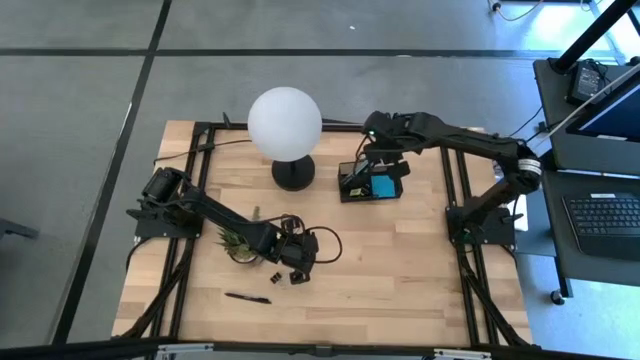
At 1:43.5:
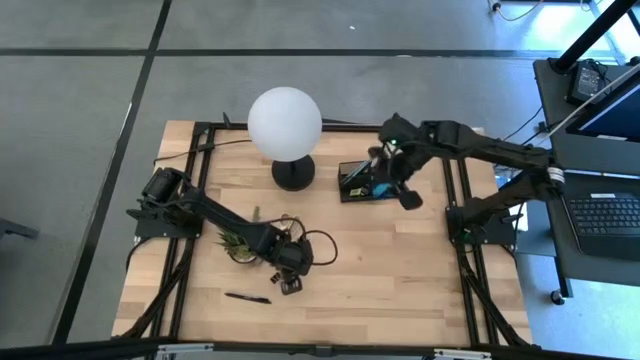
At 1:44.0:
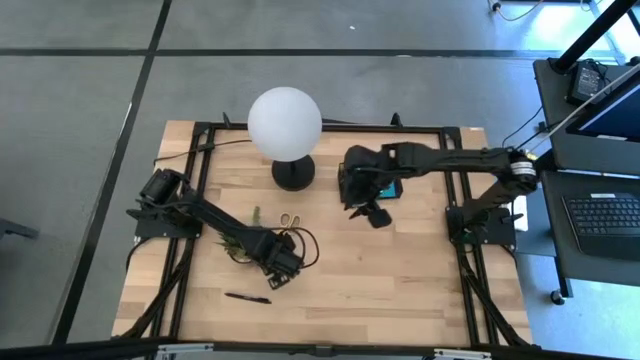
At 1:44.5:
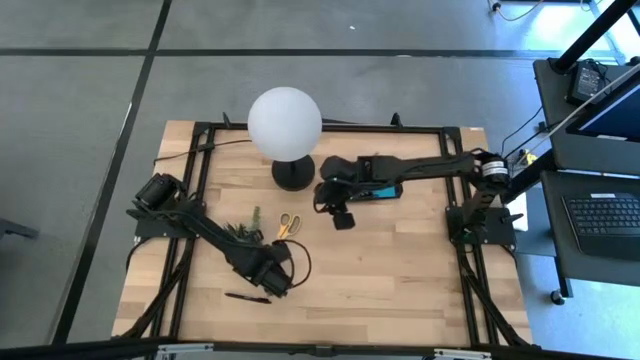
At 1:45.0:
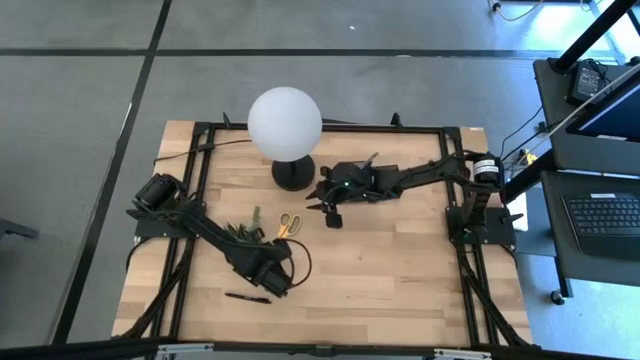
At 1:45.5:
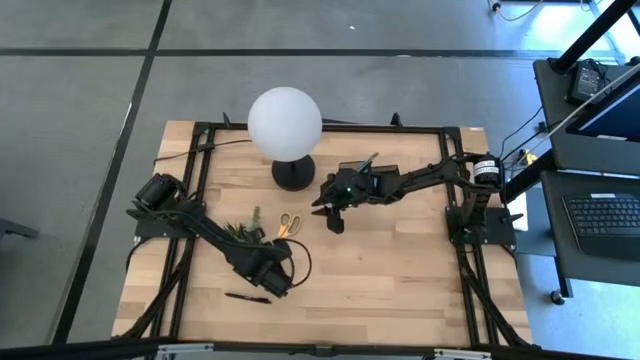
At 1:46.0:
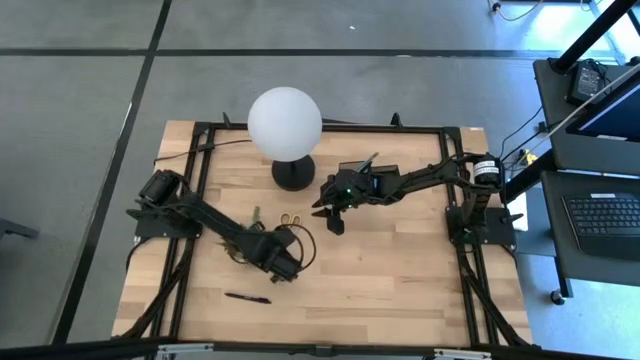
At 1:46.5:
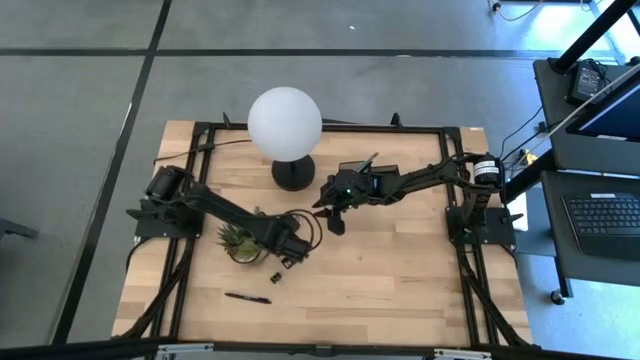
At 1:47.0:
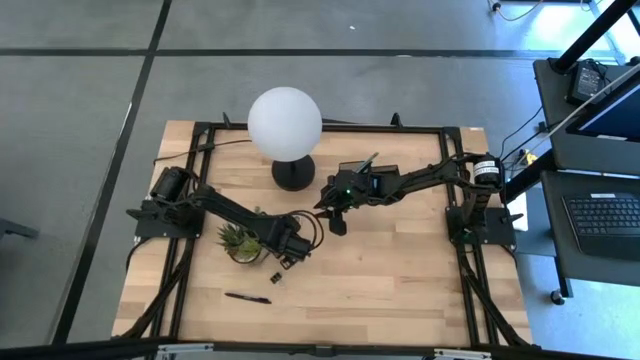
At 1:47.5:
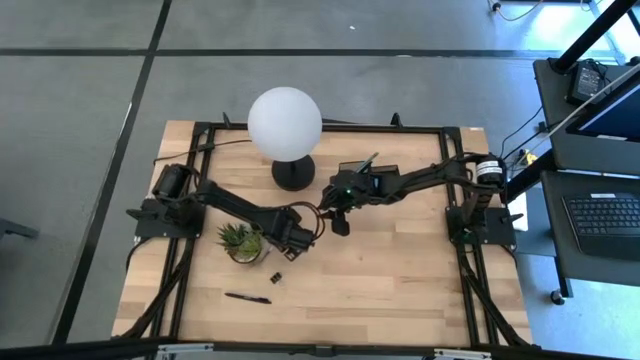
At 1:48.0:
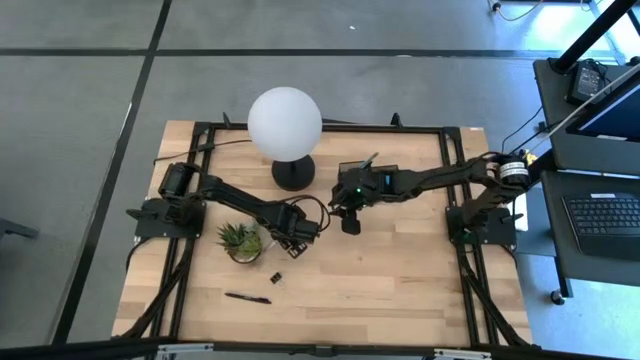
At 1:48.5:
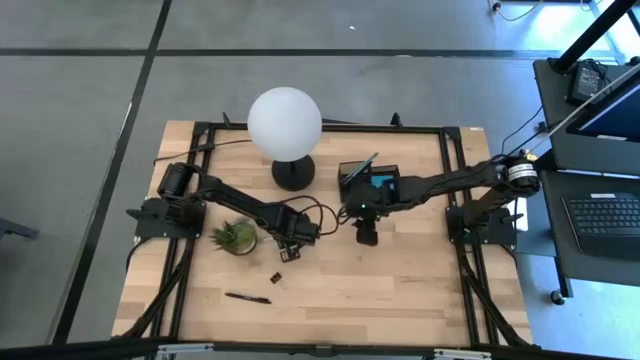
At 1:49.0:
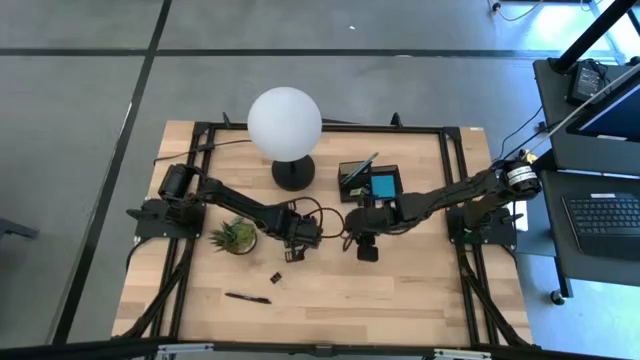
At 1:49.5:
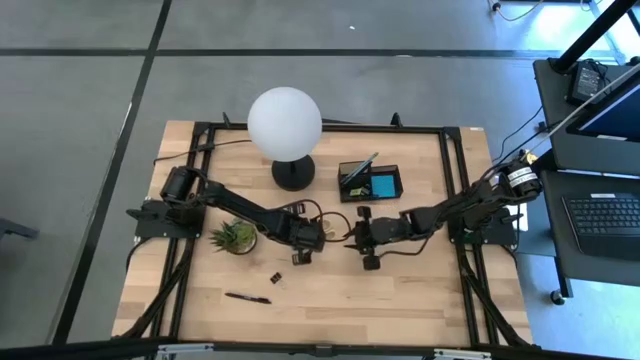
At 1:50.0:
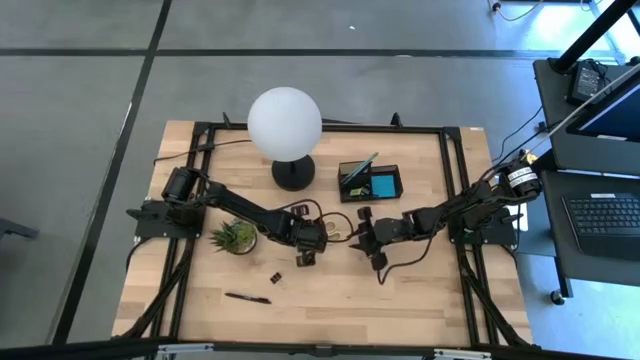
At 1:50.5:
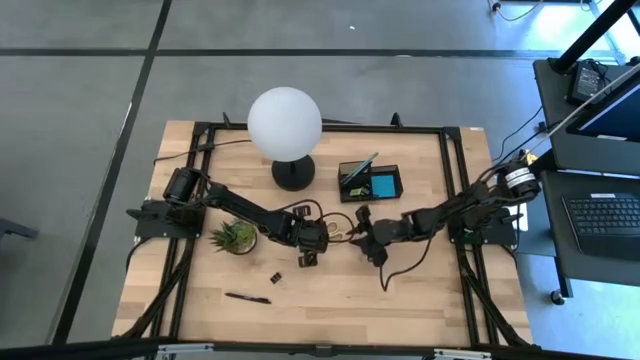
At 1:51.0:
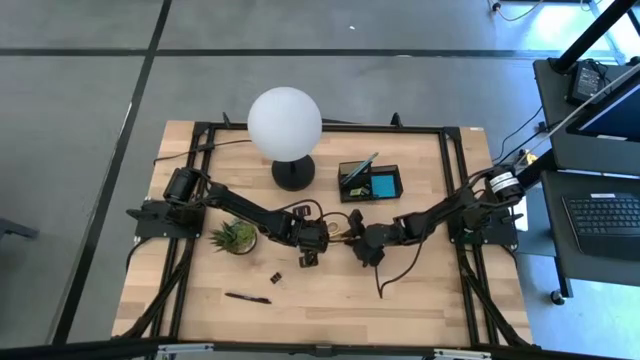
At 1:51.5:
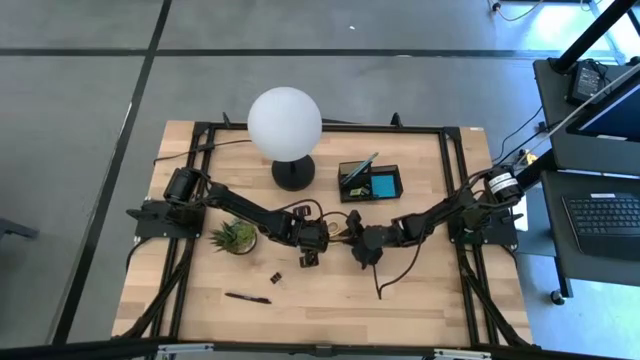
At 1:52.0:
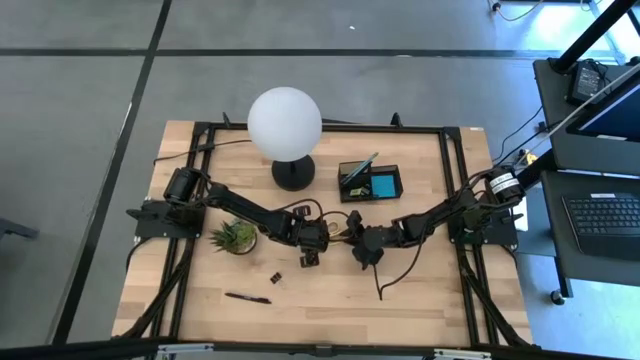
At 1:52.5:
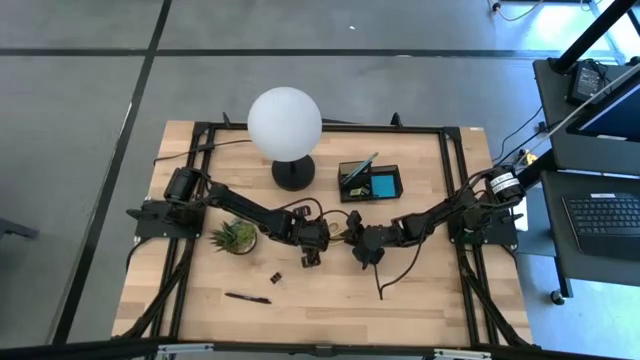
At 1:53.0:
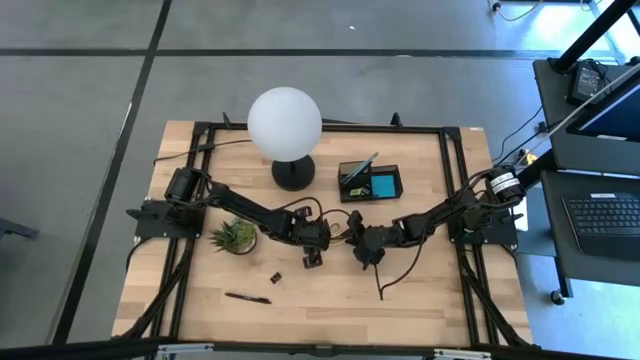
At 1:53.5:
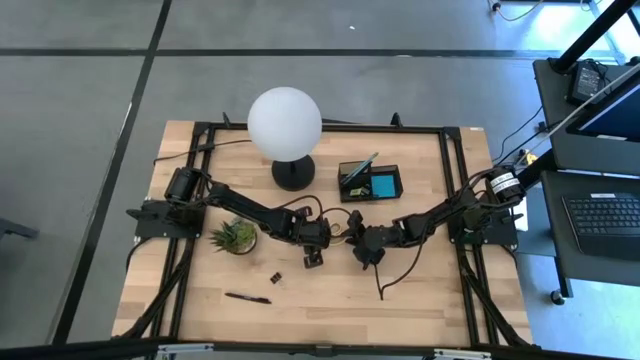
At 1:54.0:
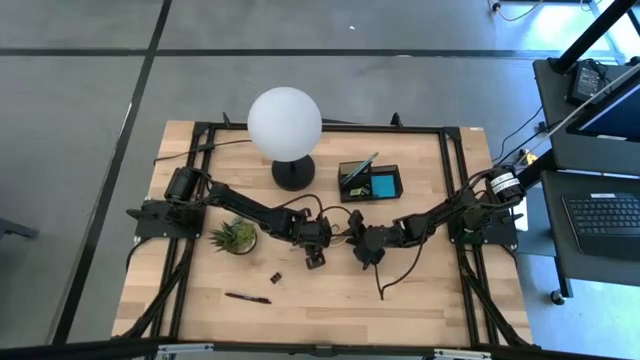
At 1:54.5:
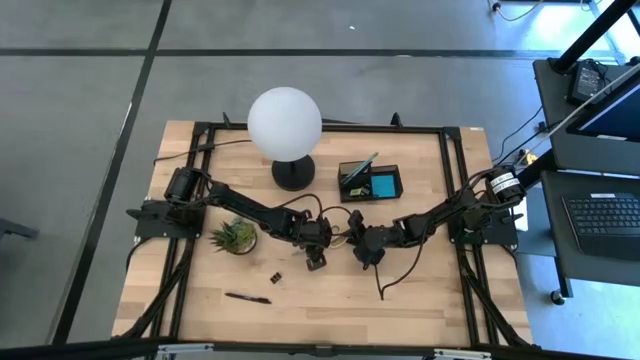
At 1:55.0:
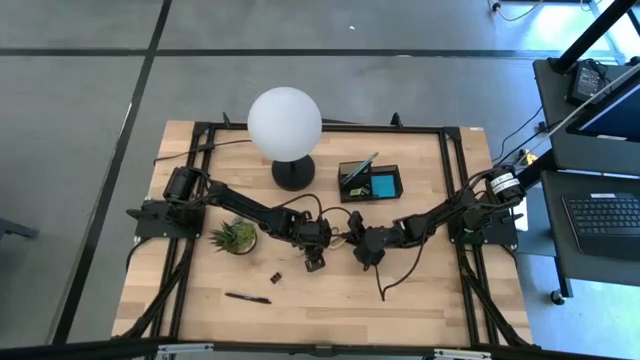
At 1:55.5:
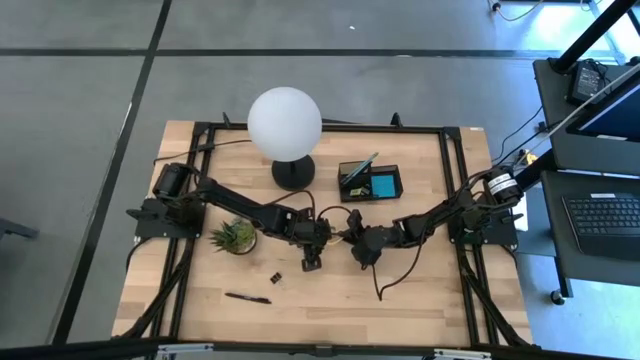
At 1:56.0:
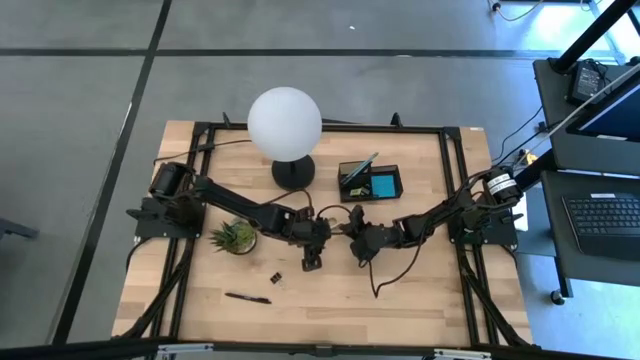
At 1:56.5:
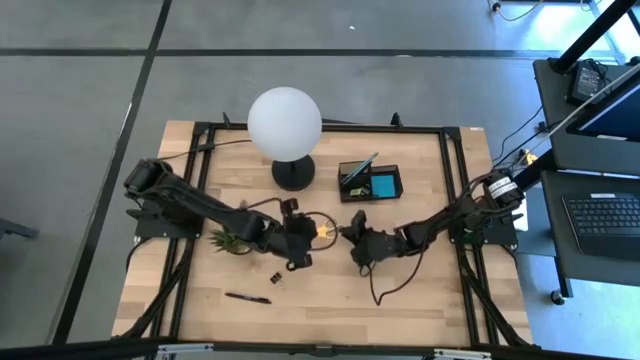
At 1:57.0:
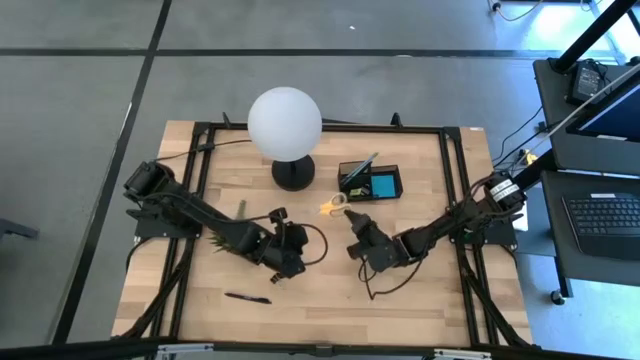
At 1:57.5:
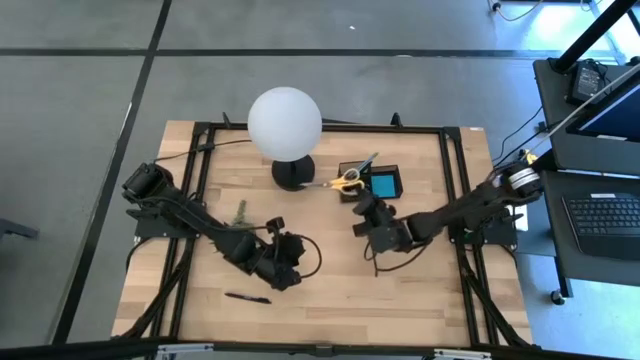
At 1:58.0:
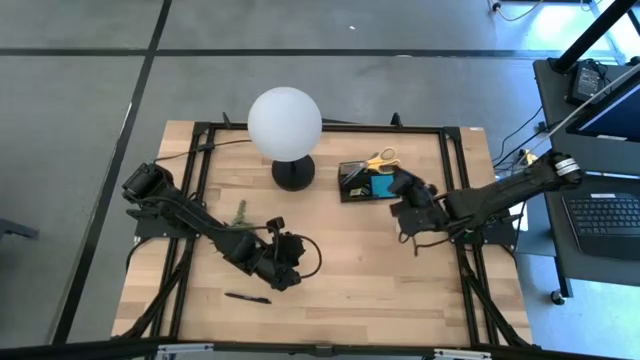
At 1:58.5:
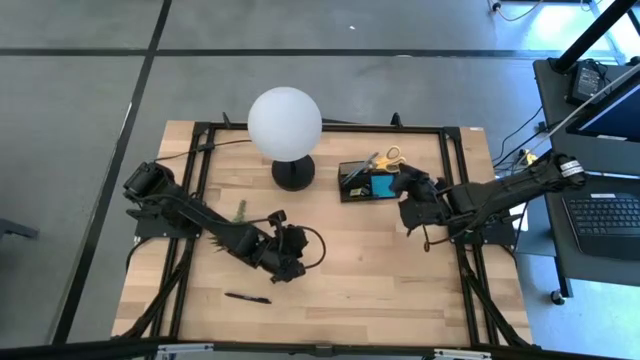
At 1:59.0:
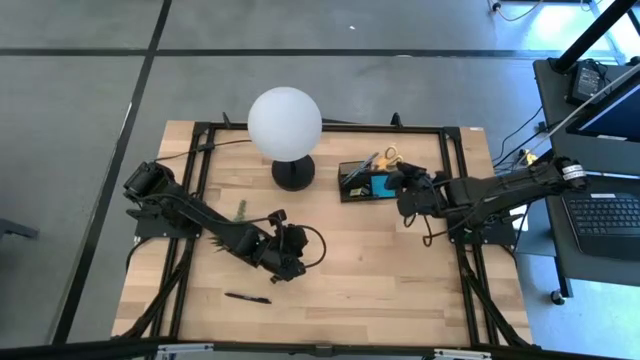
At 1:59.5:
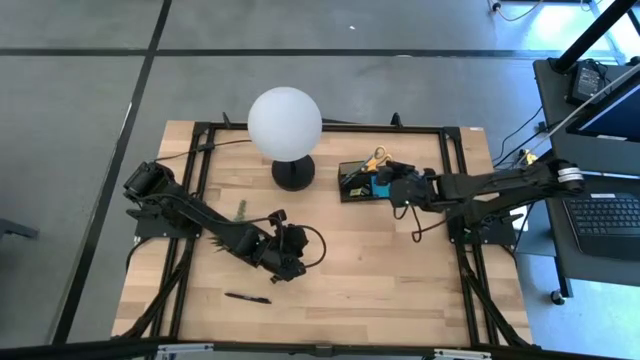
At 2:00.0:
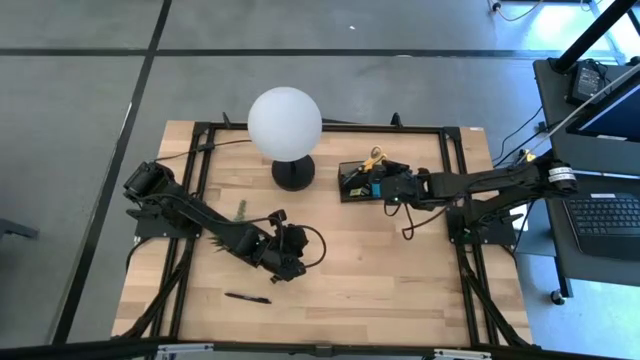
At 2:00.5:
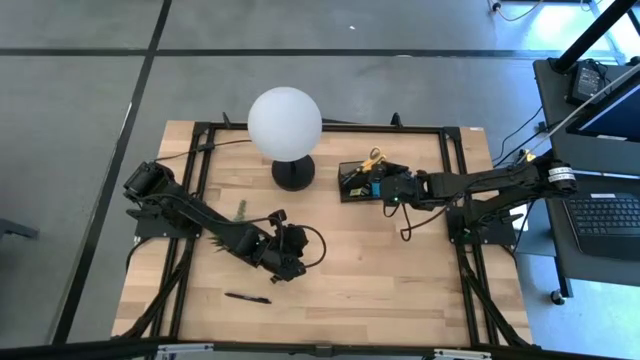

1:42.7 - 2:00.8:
Task: Pick and place office supplies into organizer
Put the yellow scissors into the desk organizer

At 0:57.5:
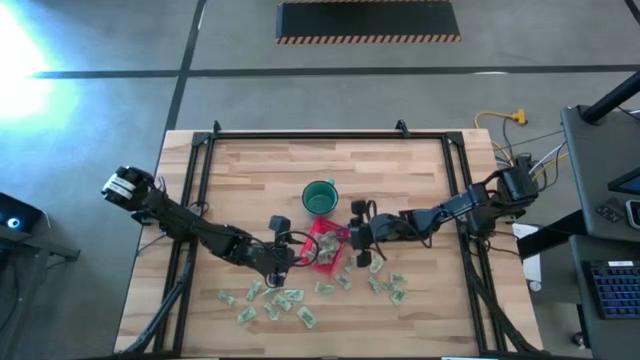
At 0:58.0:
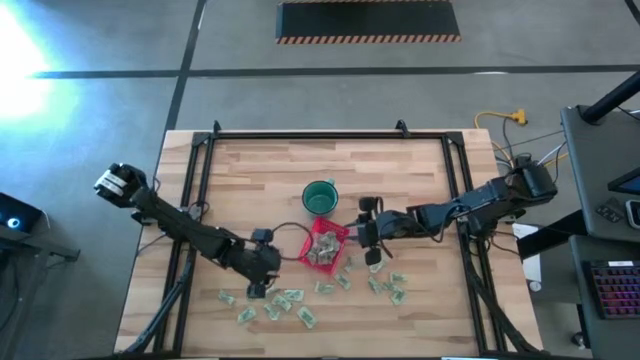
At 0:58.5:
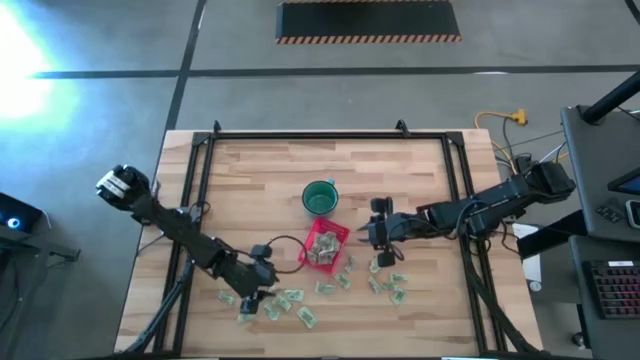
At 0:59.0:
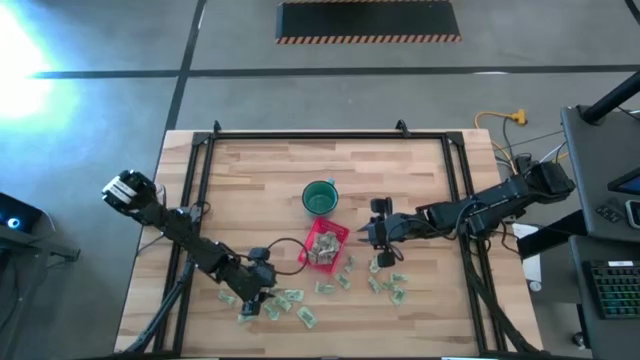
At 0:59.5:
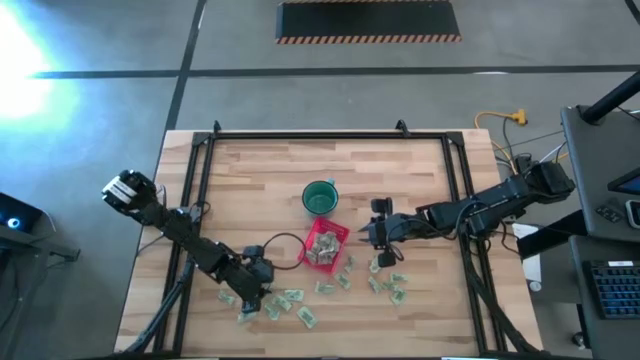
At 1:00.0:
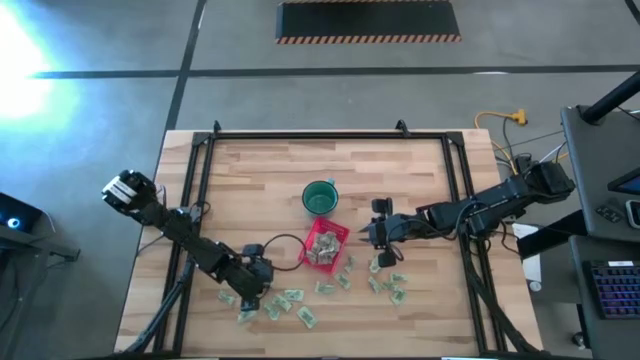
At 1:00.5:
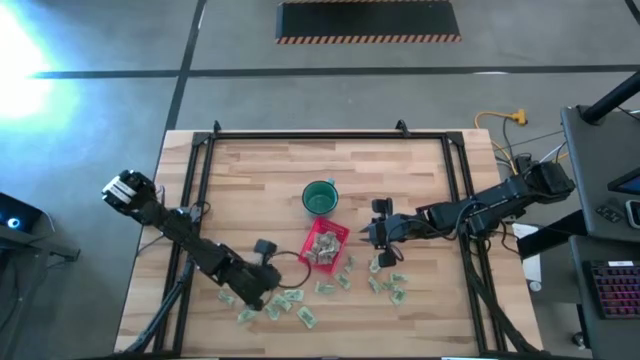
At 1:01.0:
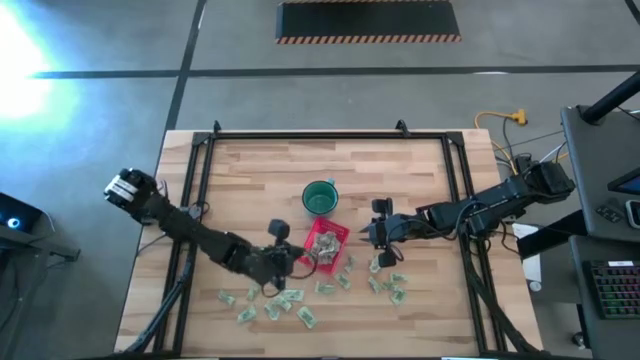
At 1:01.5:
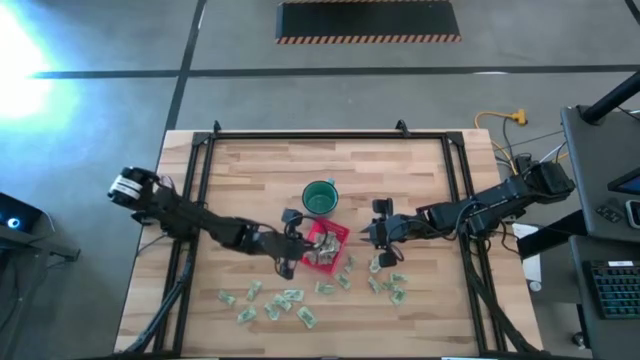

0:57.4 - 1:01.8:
Task: Pick and place items into bin
Put the light green stevia packet into the red bin
